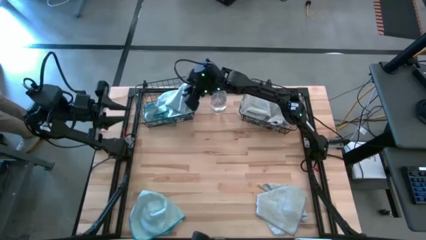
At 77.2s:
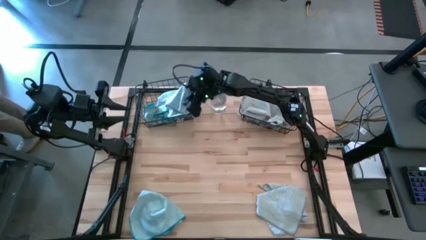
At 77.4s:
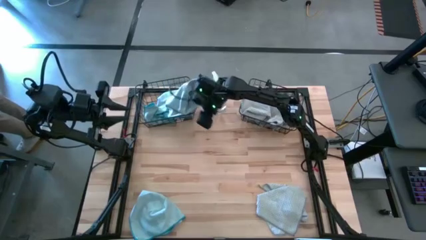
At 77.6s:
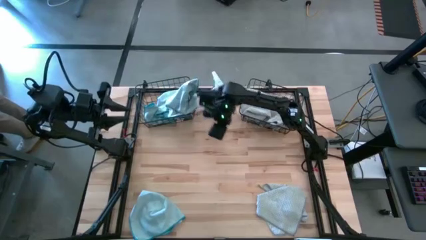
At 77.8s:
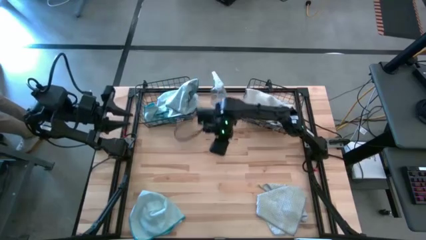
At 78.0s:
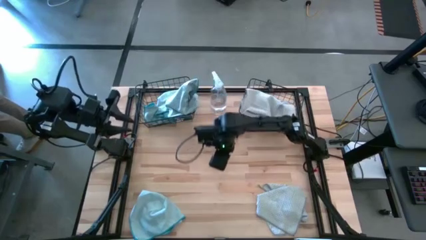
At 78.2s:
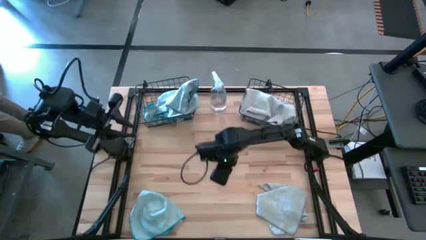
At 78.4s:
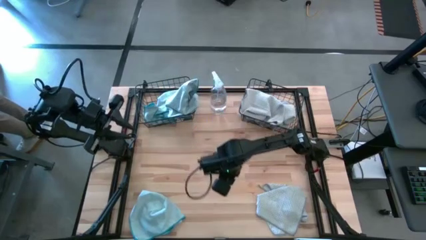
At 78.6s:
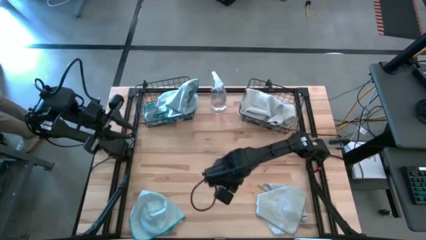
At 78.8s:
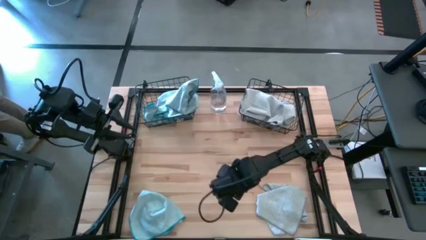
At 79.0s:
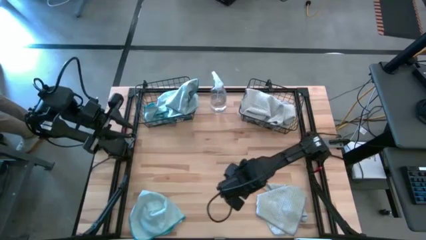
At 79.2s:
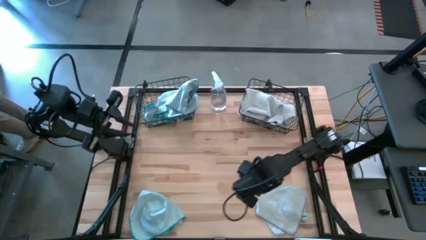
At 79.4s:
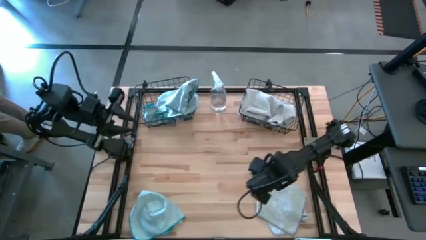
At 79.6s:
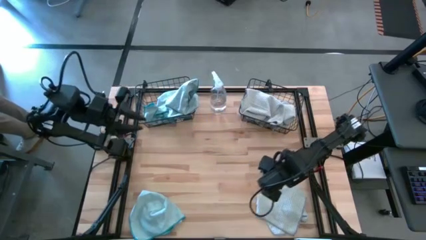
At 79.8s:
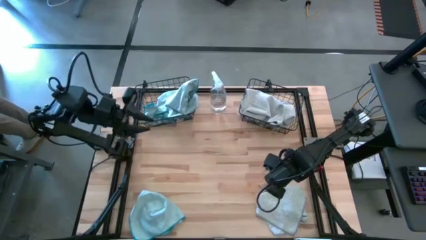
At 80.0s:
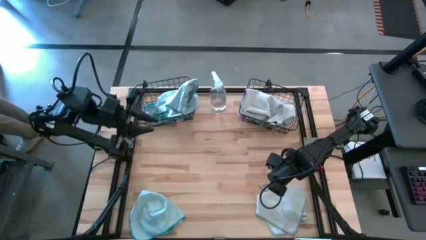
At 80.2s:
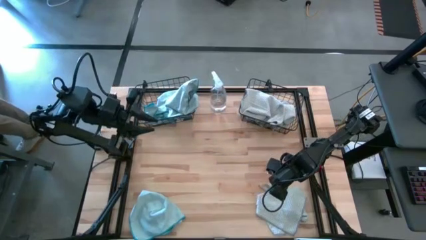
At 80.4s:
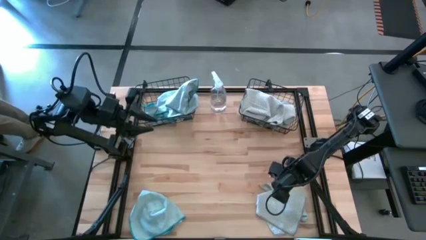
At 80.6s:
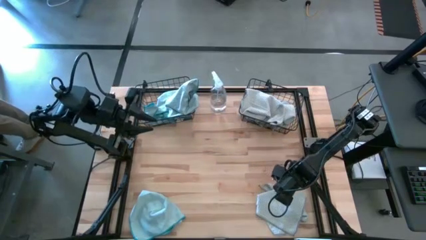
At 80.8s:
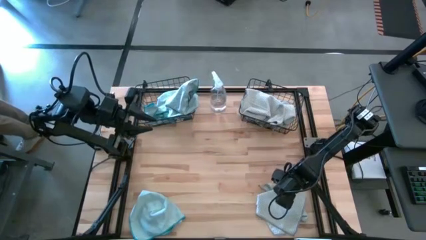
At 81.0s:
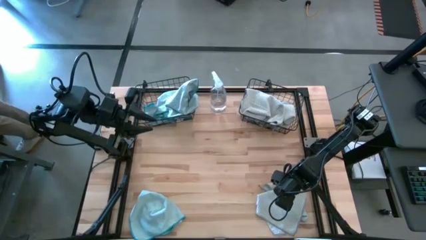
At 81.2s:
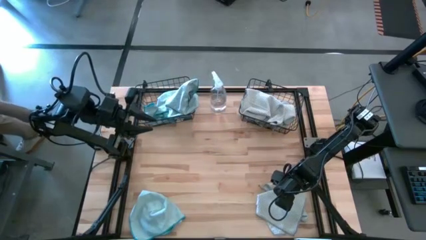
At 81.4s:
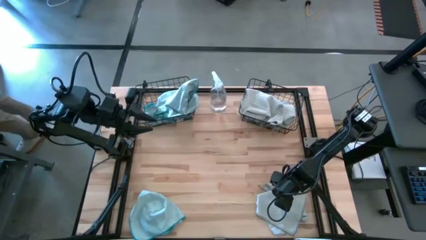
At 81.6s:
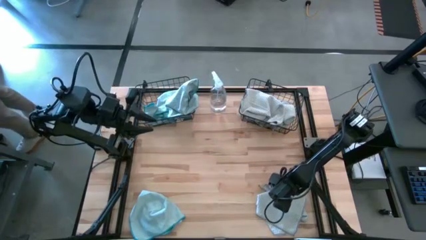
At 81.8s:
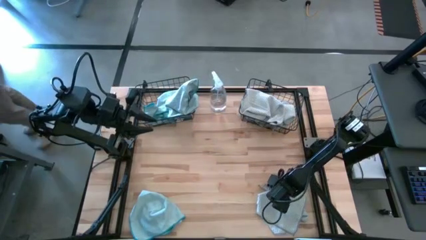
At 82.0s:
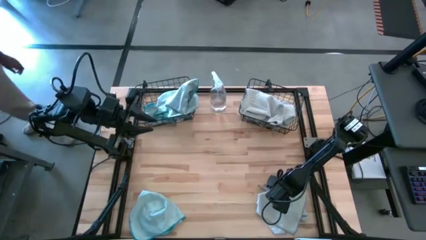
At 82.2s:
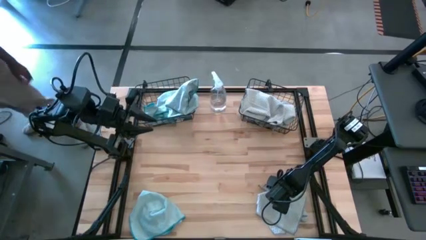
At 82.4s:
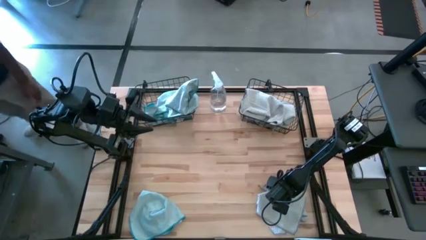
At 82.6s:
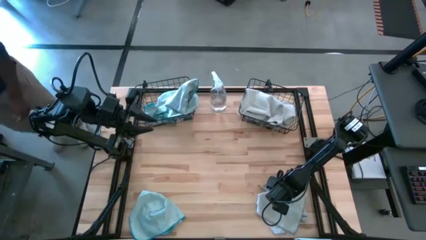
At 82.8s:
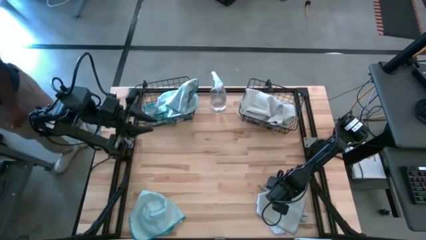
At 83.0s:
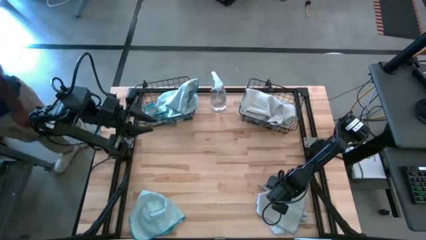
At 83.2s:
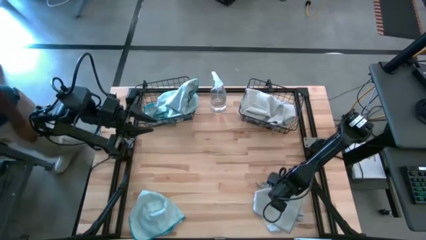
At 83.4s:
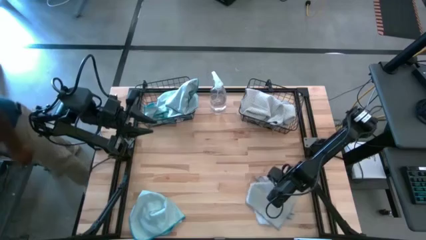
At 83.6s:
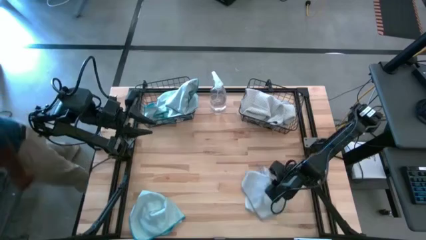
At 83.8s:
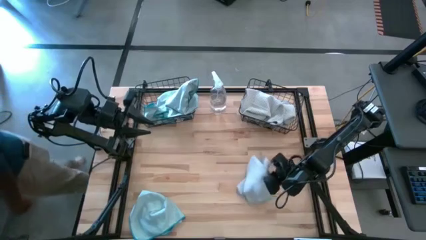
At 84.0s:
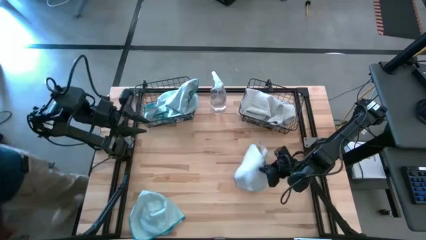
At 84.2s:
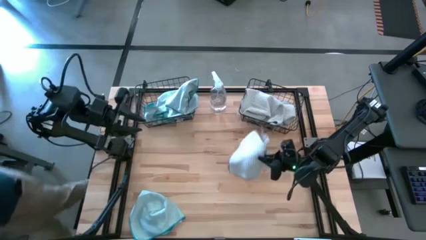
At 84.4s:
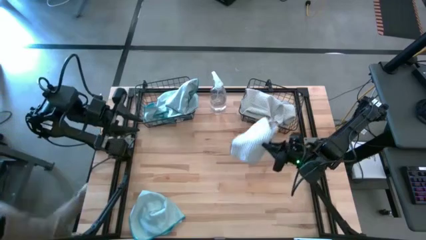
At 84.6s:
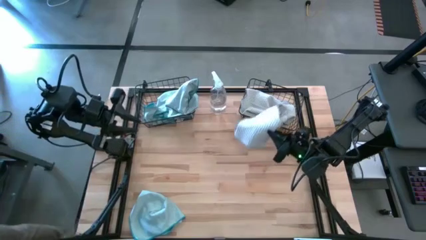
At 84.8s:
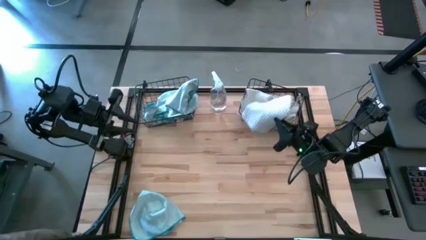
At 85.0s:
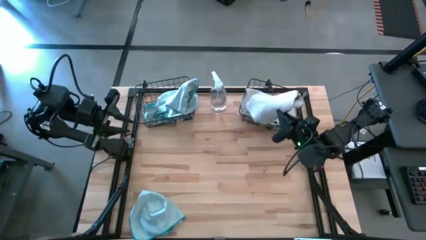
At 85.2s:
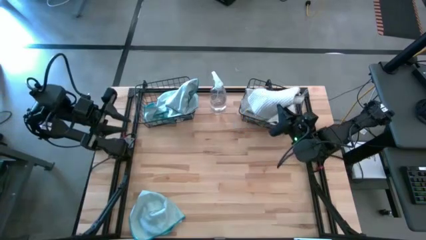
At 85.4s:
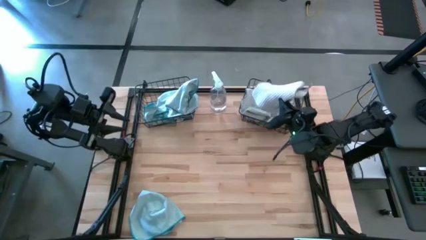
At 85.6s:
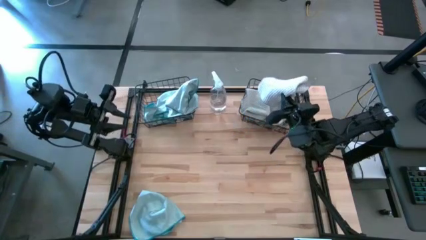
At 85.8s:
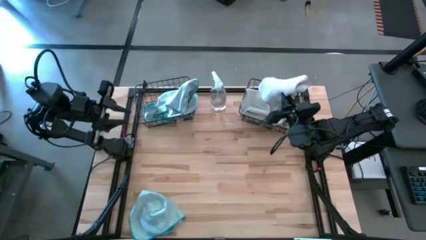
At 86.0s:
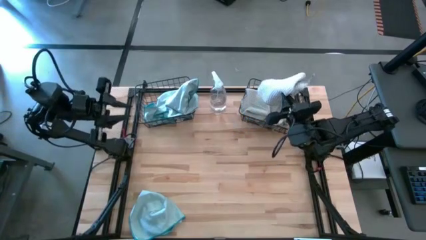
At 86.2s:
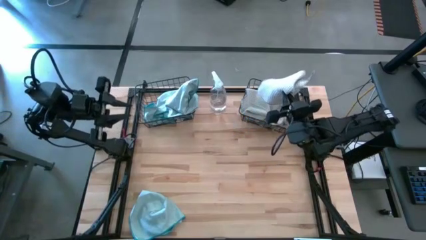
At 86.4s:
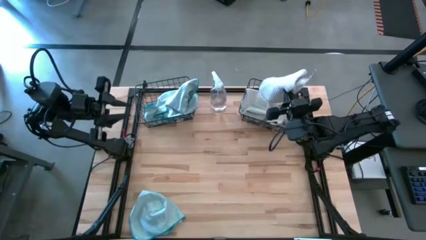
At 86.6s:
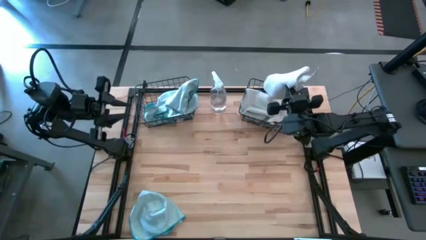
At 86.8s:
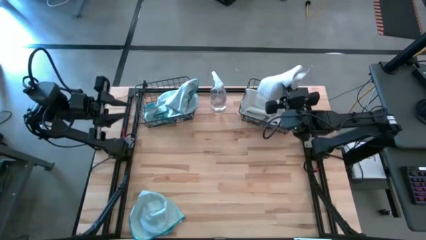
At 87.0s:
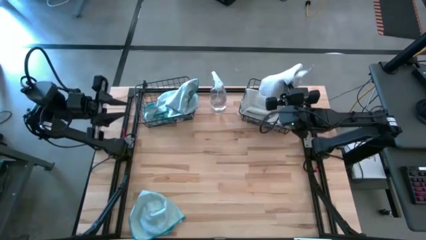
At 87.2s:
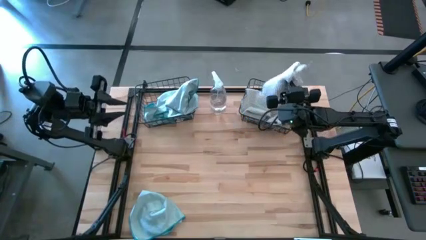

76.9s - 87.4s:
Task: Sort microfiber towel by color & place in baskets
Put the gray microfiber towel into the right black wire basket

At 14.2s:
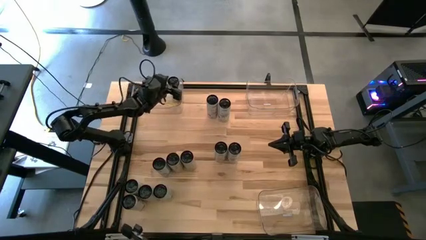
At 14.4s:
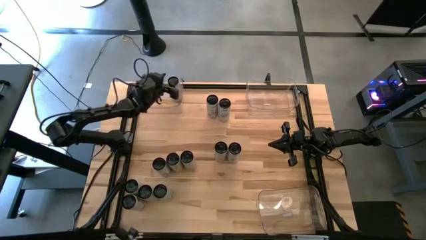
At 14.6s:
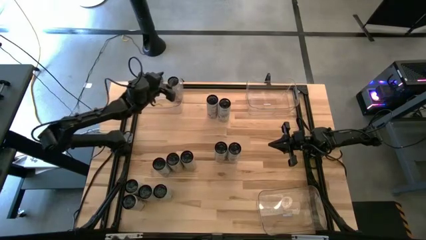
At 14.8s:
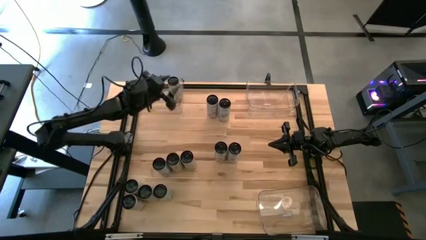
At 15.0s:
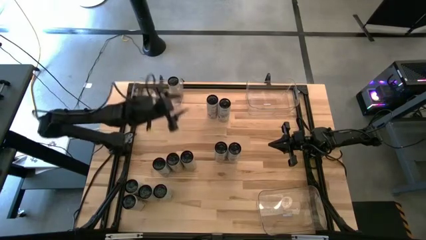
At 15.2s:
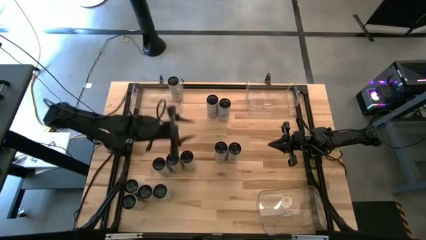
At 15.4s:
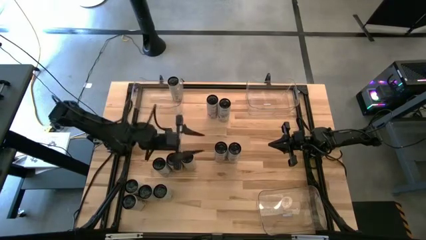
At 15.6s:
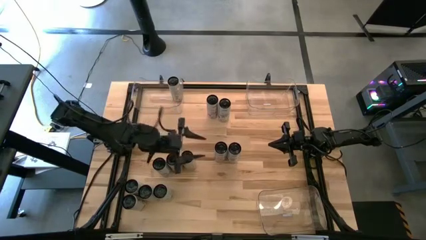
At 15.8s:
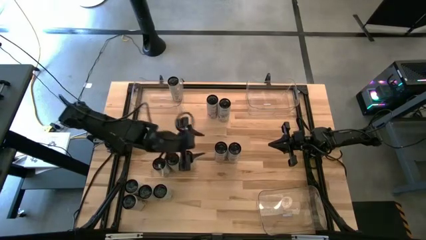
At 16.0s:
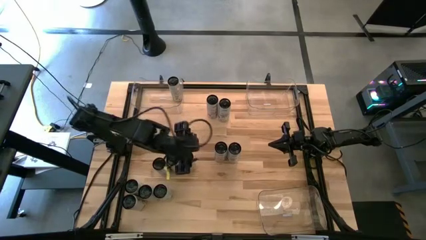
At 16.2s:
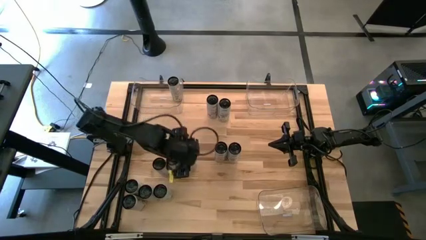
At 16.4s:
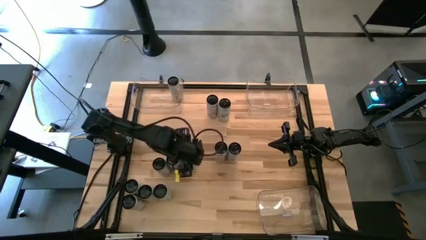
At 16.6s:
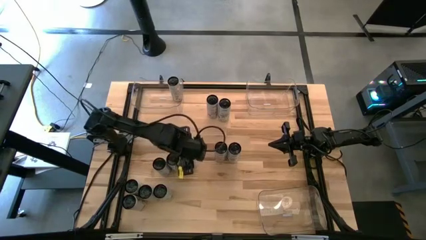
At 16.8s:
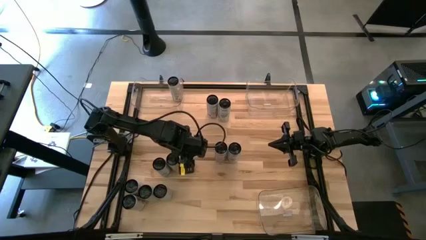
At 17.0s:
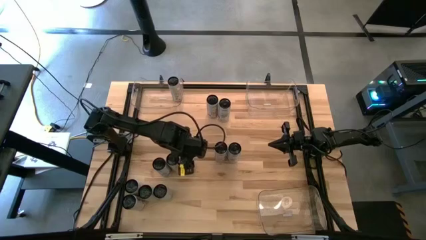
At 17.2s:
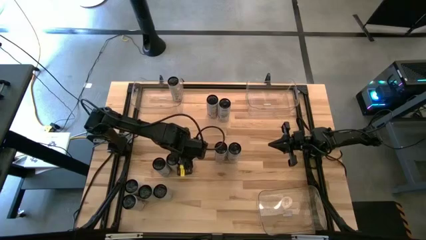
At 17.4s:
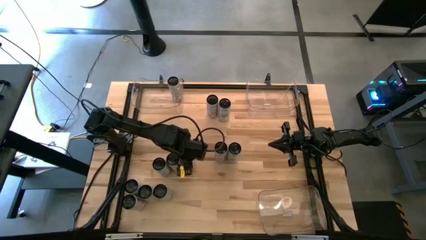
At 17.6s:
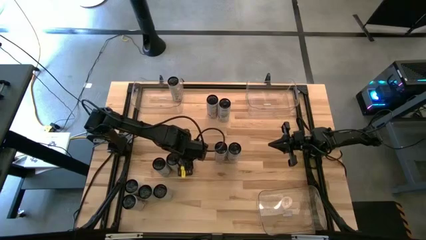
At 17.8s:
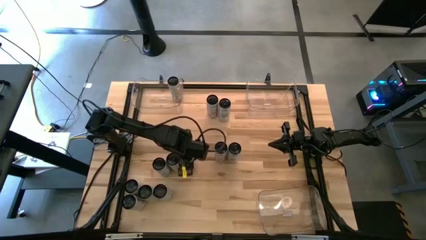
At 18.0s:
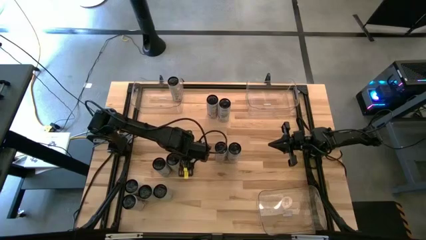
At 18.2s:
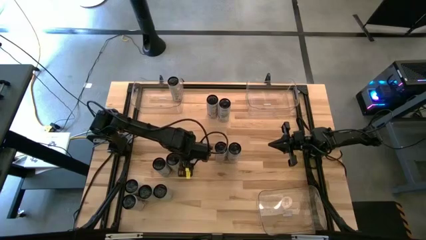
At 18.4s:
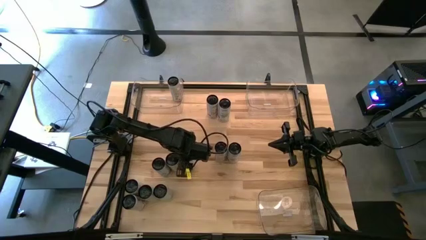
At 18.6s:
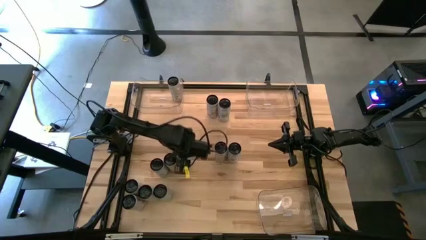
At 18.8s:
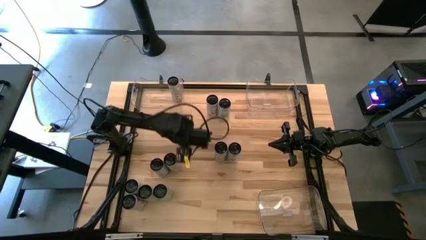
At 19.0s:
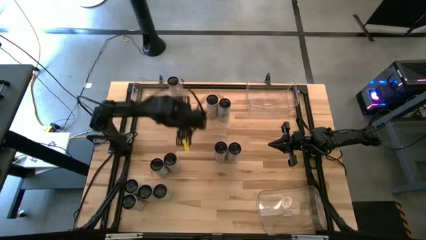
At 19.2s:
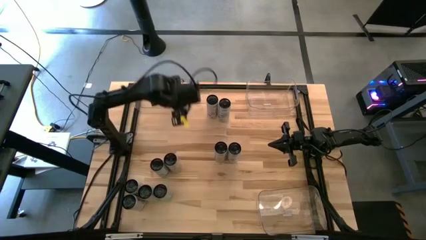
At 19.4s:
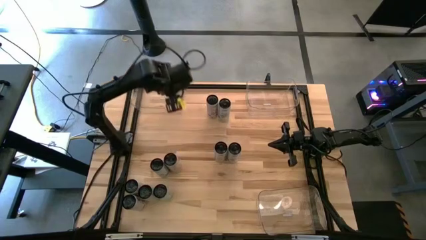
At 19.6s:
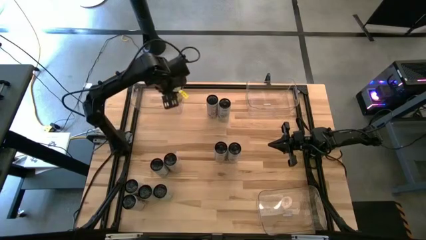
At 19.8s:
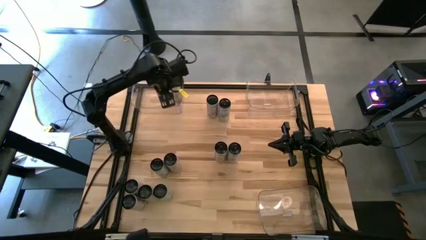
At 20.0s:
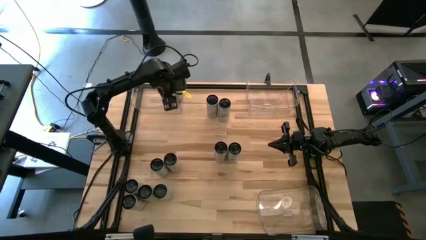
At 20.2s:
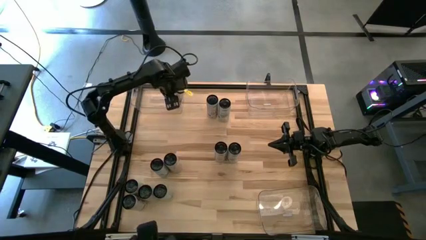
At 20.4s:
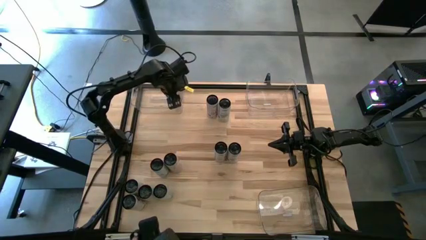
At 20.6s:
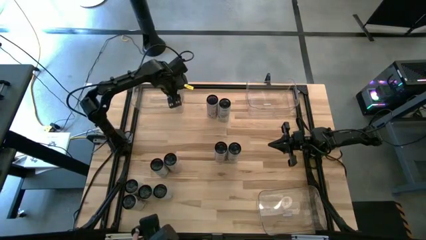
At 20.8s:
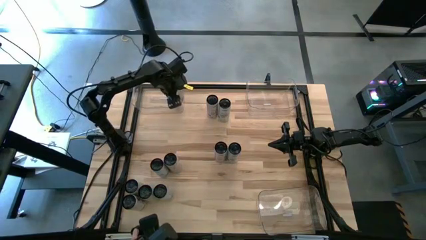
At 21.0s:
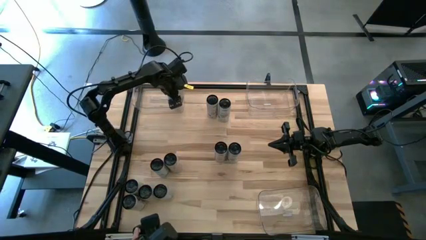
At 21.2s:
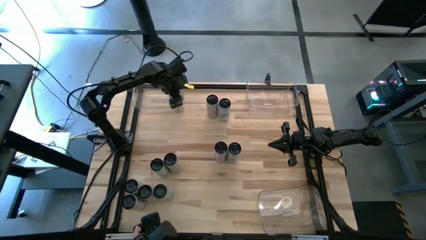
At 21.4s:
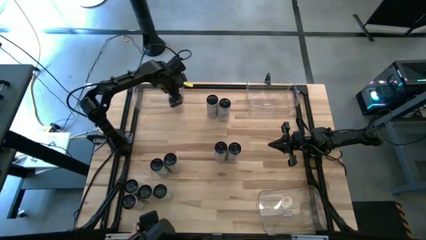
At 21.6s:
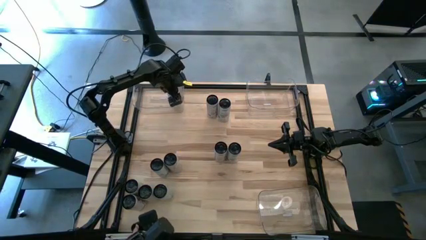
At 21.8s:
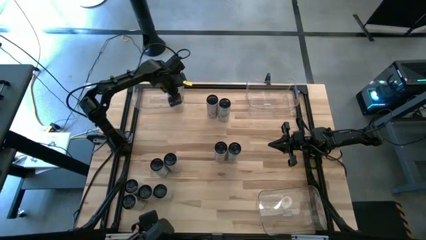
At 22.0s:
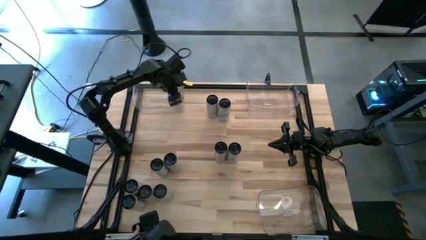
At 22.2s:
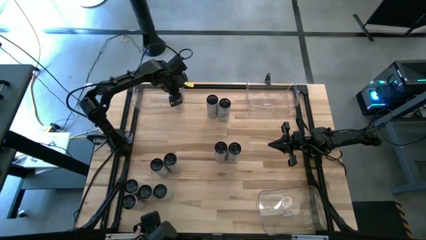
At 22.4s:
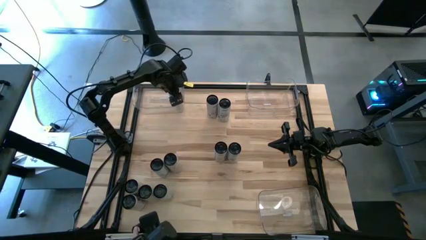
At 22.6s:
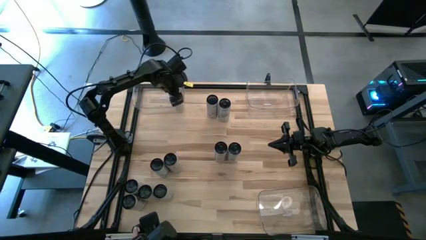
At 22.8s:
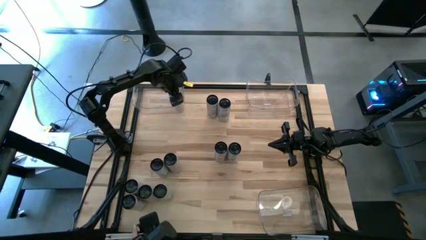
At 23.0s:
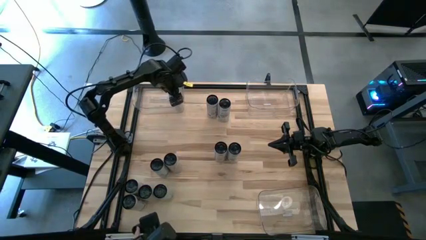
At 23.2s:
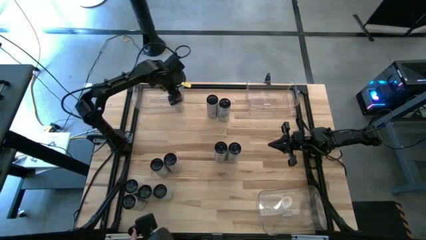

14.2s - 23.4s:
Task: Sort soda cans
Put the white-yellow soda can into the top left transparent bin
